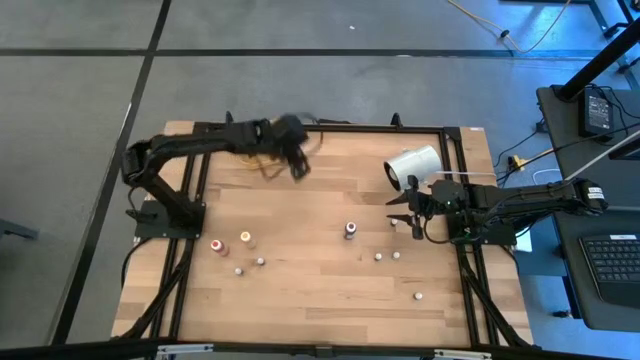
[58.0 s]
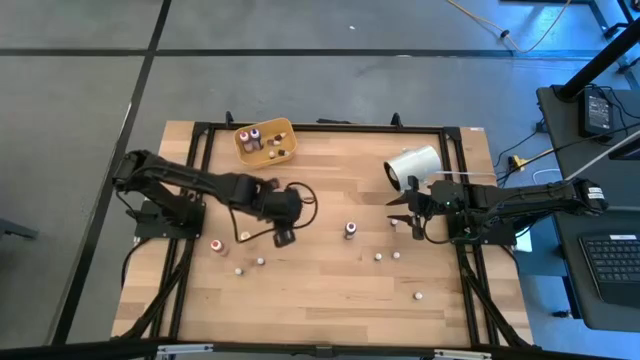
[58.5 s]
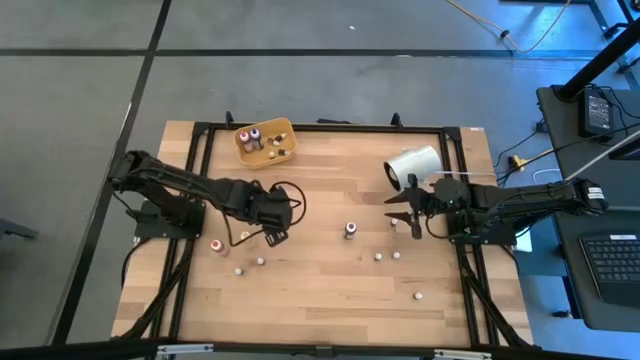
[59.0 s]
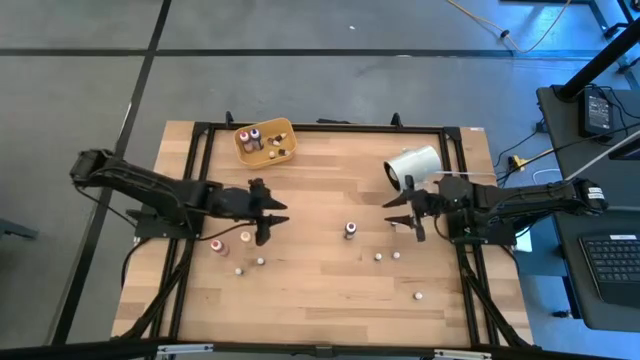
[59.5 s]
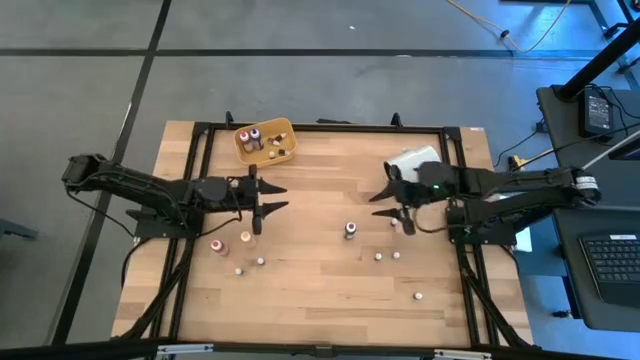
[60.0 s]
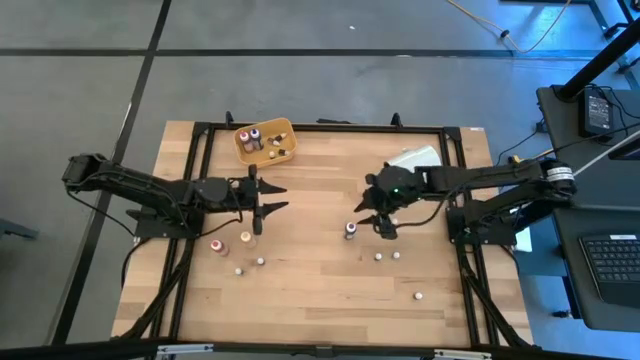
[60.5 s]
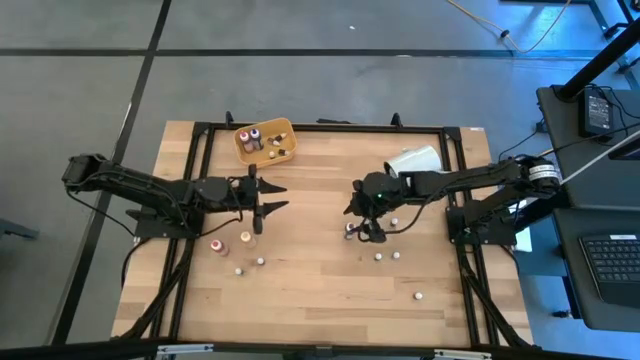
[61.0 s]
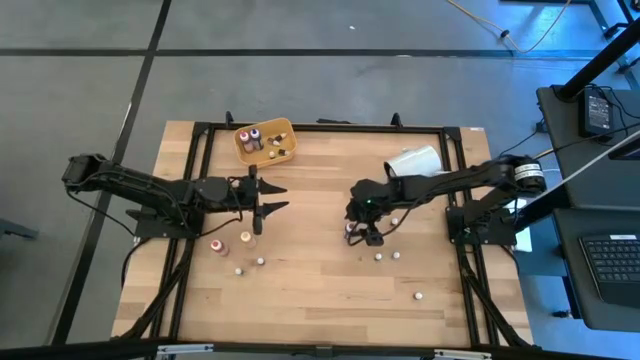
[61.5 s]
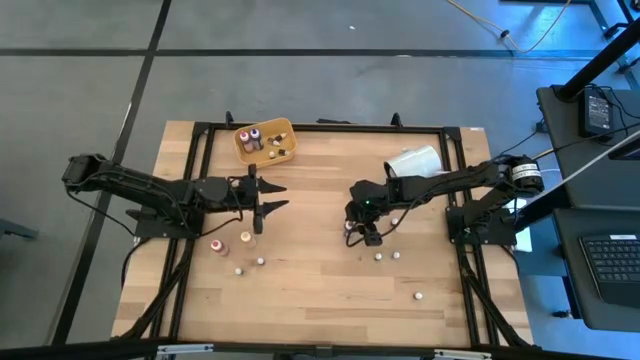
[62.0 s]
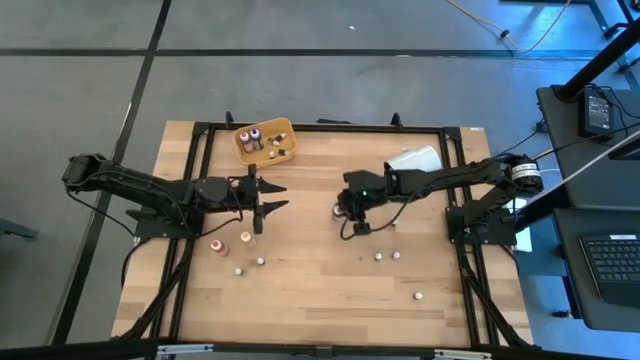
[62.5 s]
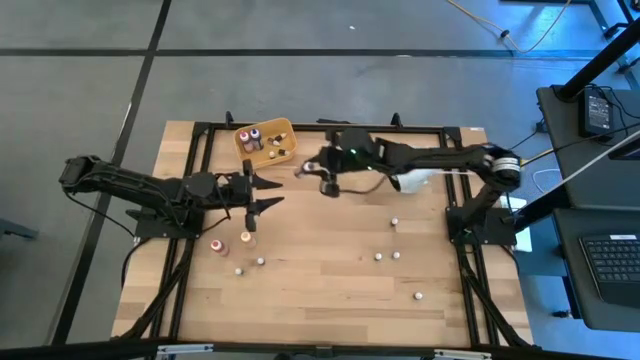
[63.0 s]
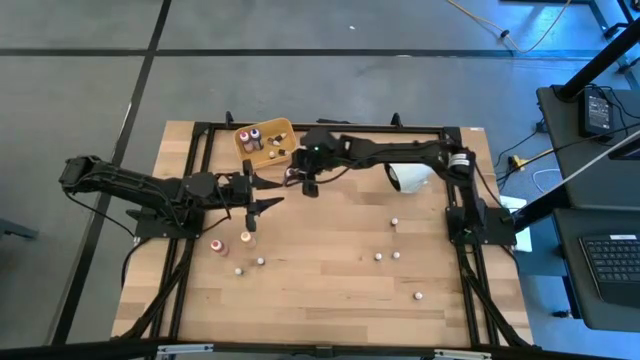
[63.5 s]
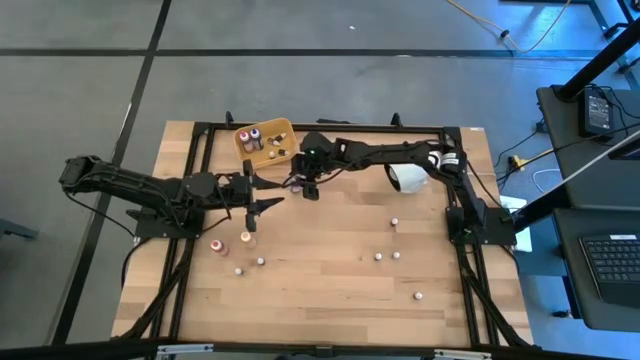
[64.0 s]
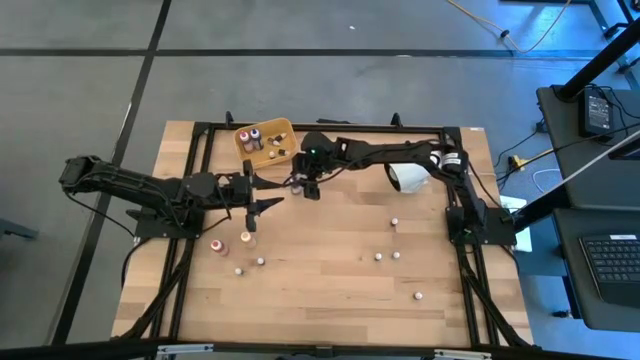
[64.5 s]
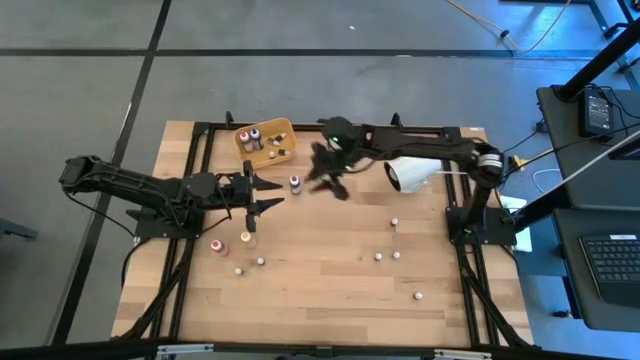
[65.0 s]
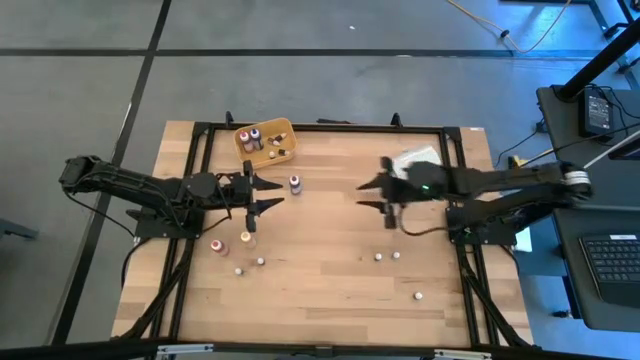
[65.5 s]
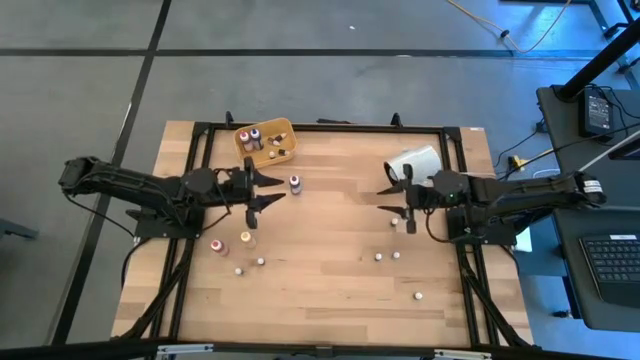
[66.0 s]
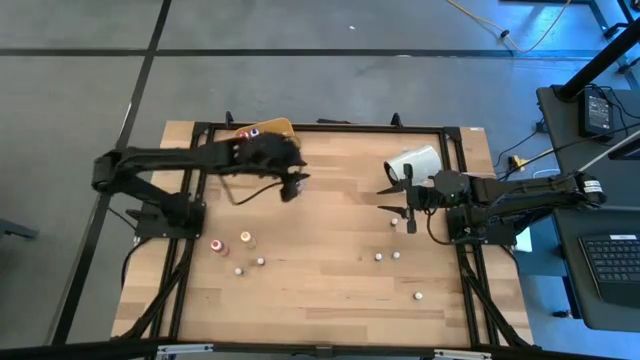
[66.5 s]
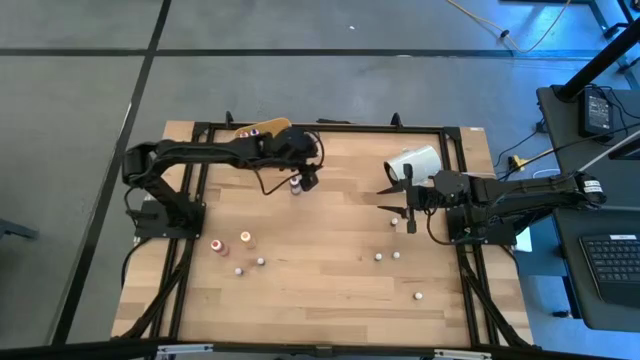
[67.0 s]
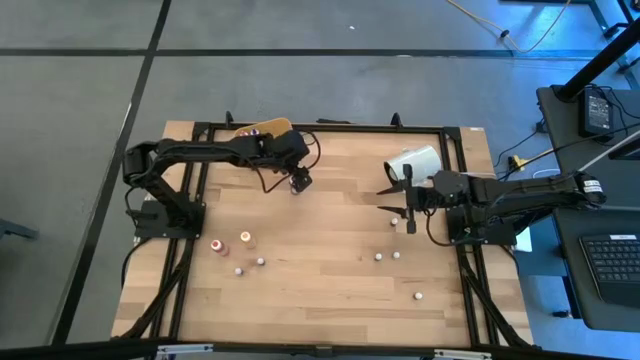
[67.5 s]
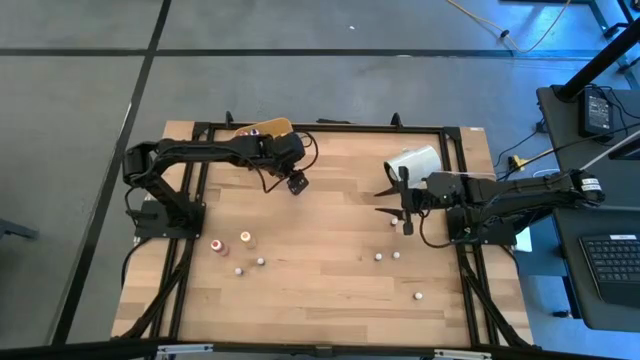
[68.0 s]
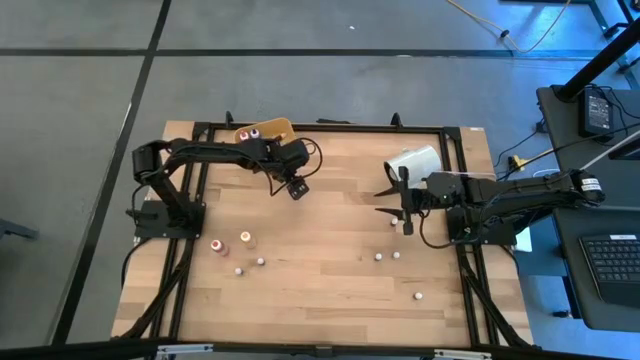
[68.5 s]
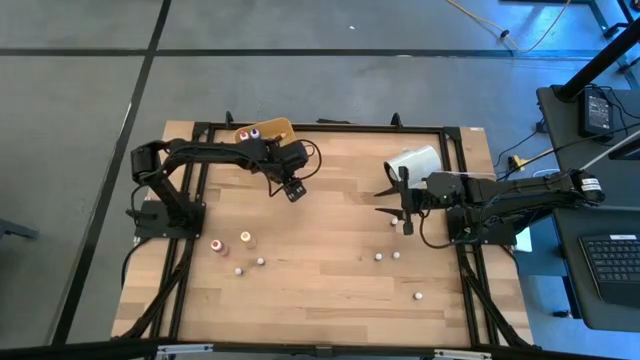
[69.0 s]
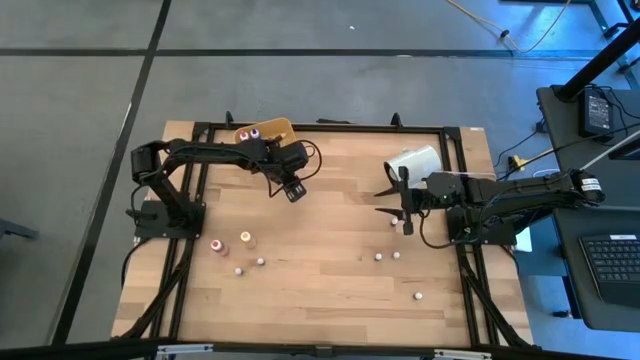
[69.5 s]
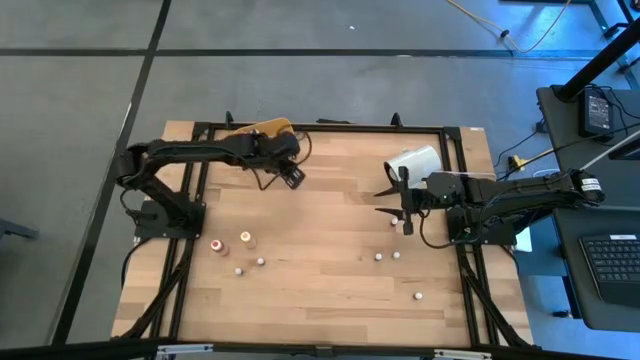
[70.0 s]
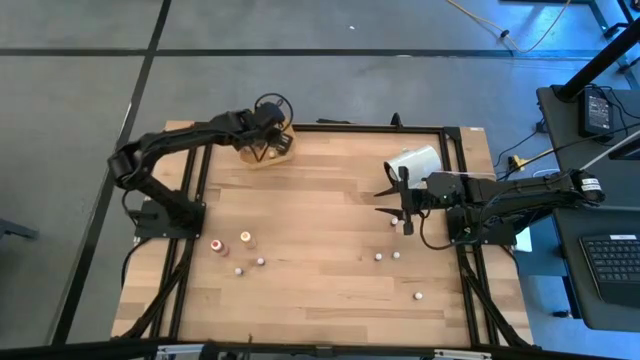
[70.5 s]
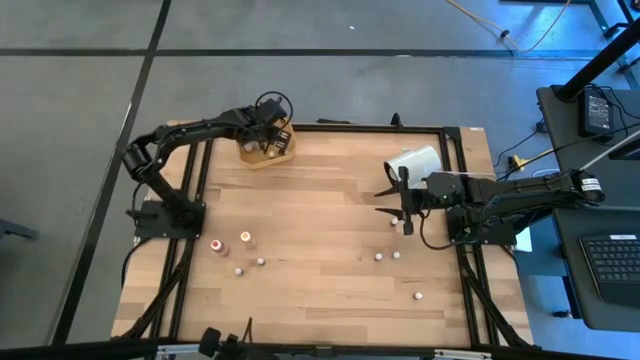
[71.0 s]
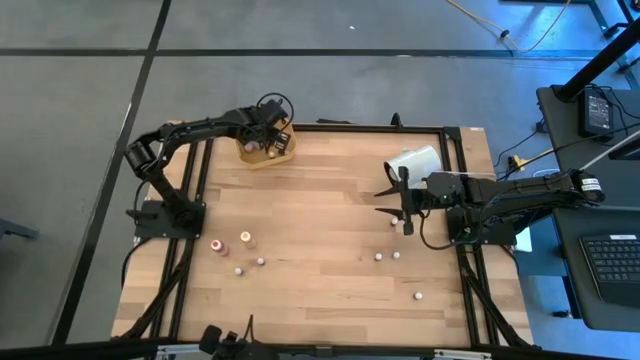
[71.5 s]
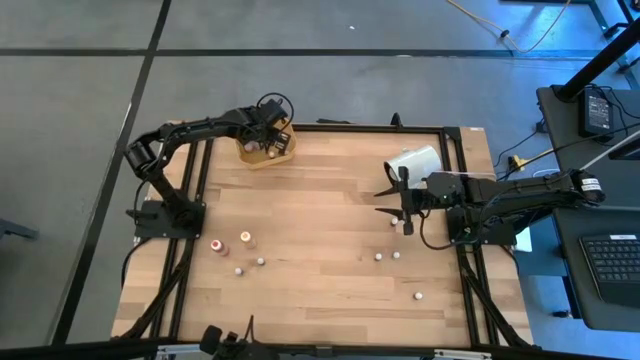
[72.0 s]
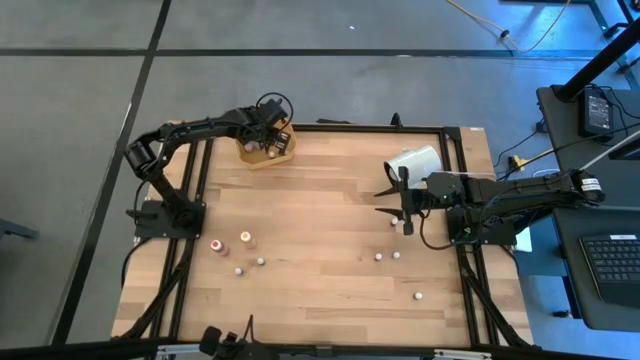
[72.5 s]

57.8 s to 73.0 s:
Task: Pick & Place food coloring
Put the large purple food coloring bottle into the yellow bin

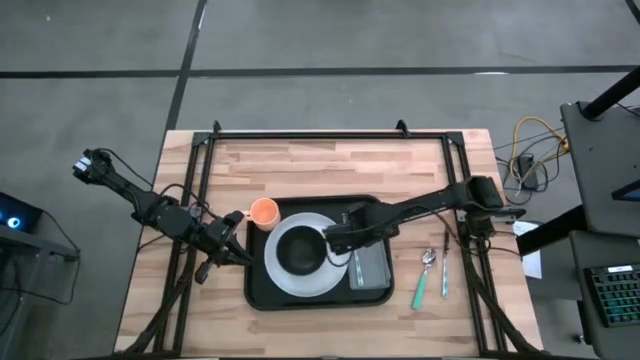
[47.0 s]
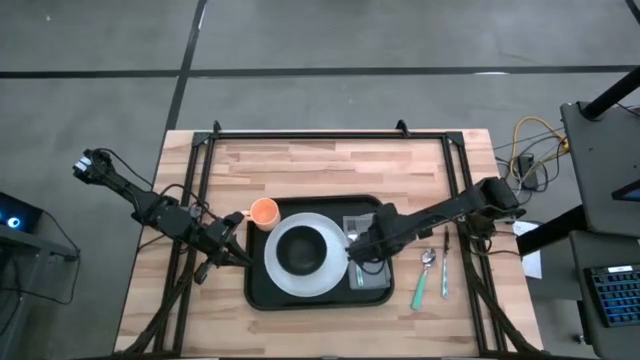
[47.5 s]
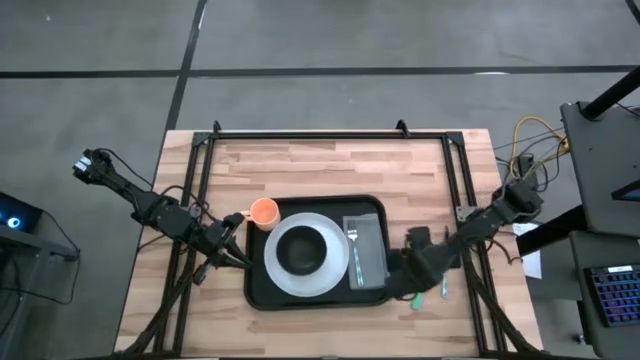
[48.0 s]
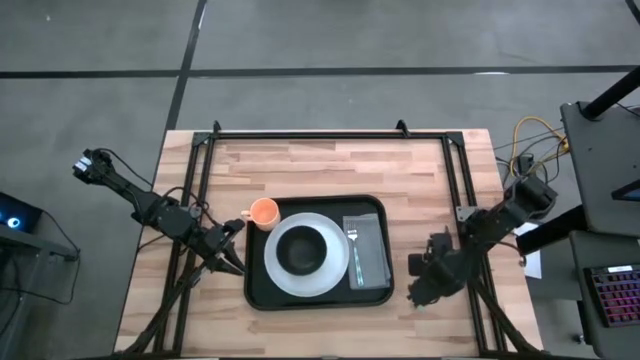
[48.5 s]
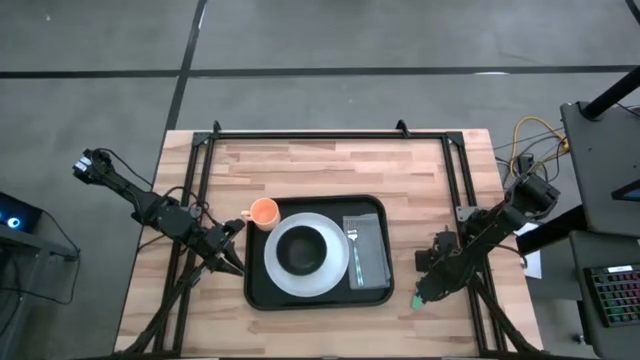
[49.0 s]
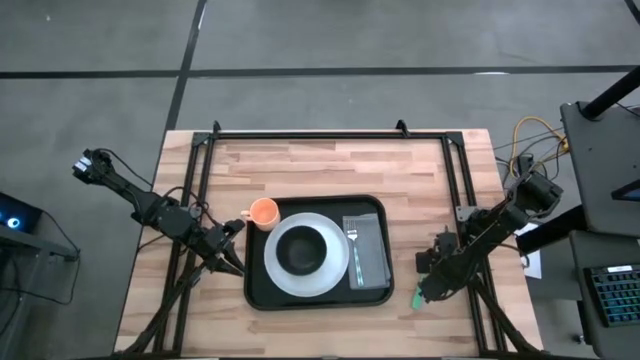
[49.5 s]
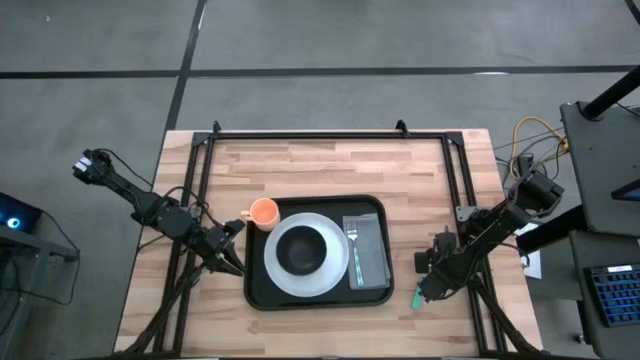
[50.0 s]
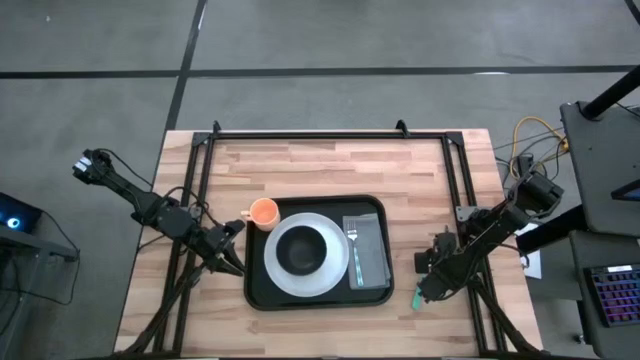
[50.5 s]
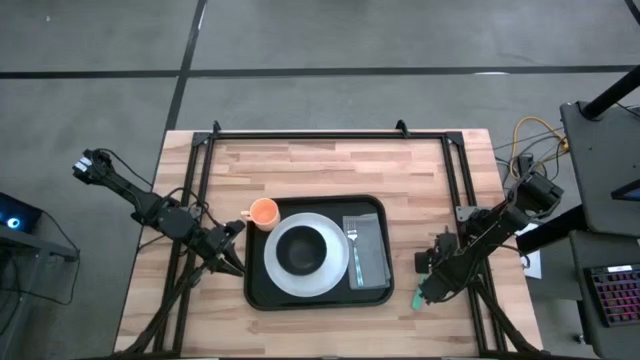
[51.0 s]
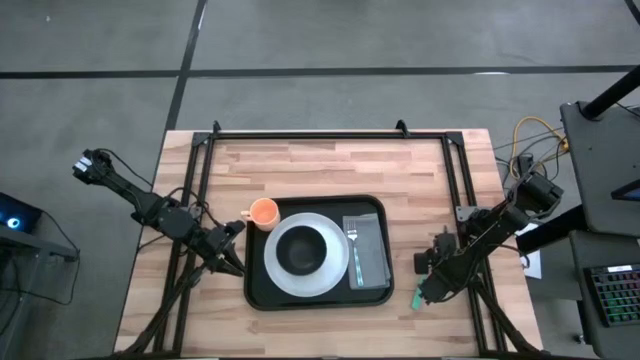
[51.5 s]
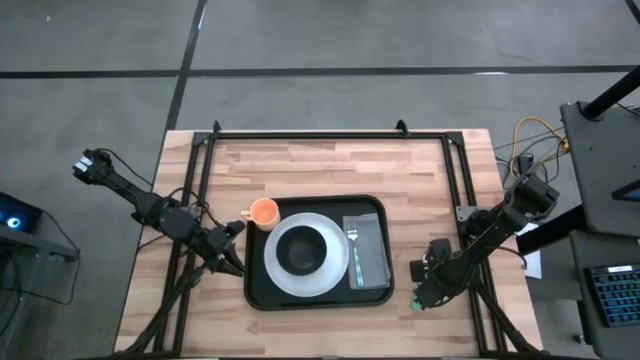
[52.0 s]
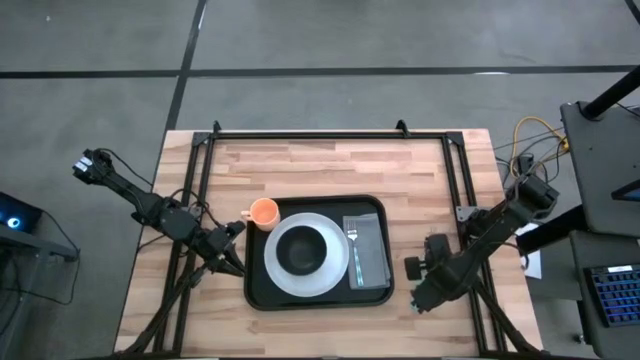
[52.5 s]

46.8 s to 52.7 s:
Task: Set up tray
Put the green knife on the gray napkin

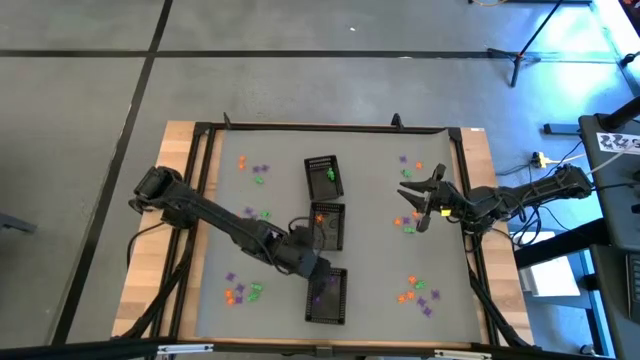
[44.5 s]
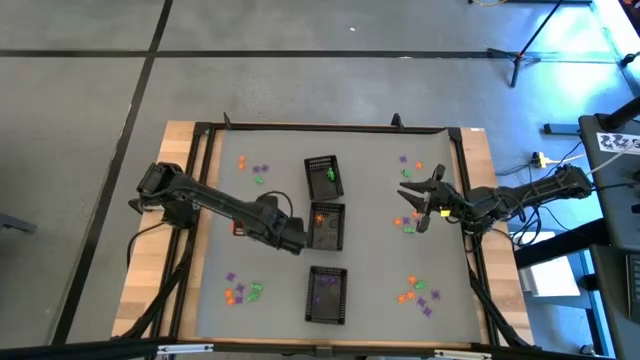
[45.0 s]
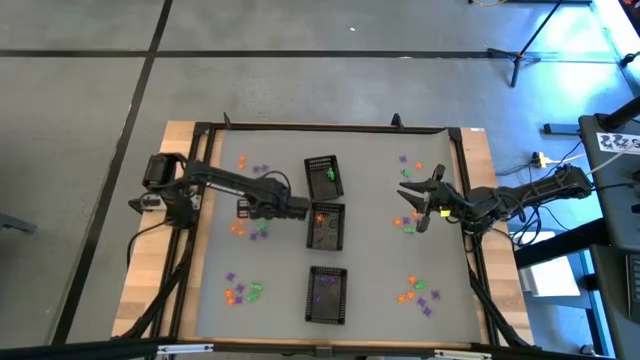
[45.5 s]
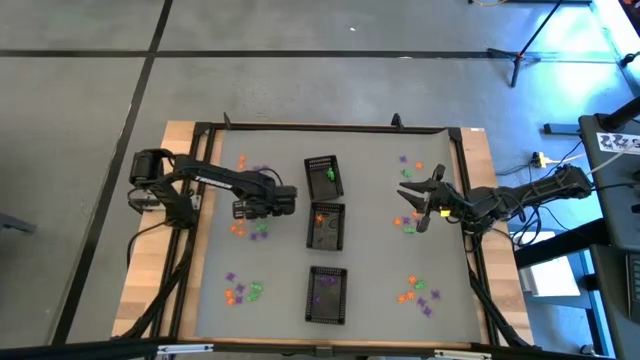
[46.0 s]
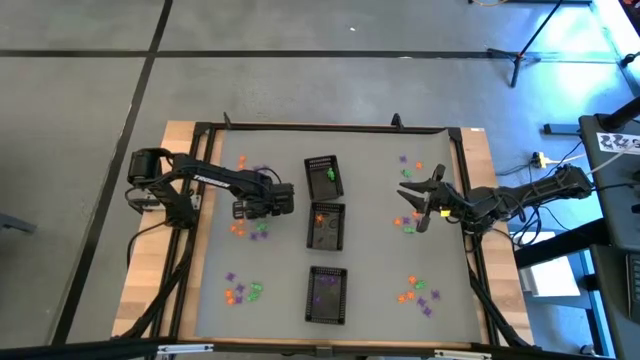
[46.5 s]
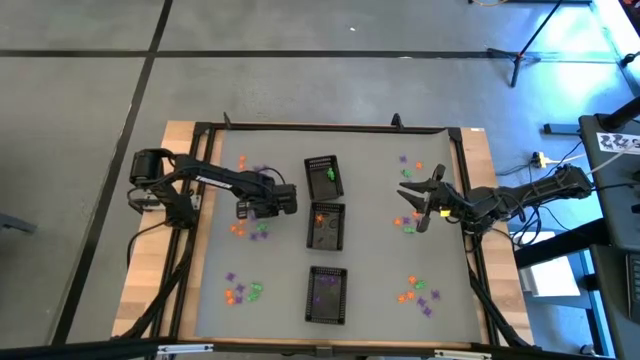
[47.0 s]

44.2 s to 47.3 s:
Task: Sort Halloween decoration
Put the green skeleton toy into the top black bin
